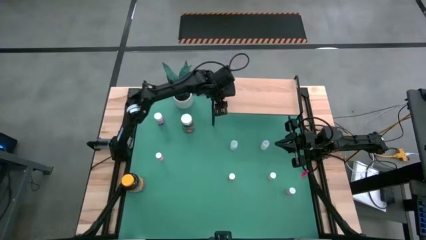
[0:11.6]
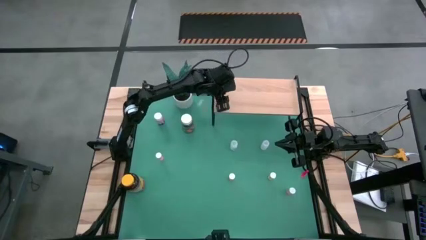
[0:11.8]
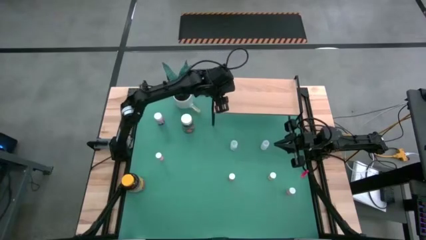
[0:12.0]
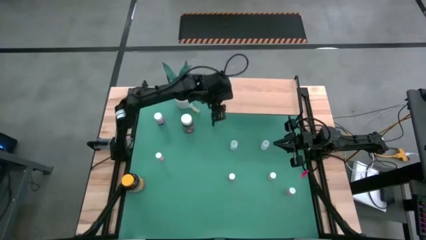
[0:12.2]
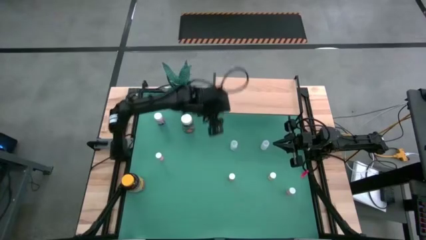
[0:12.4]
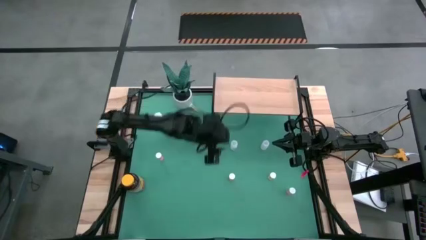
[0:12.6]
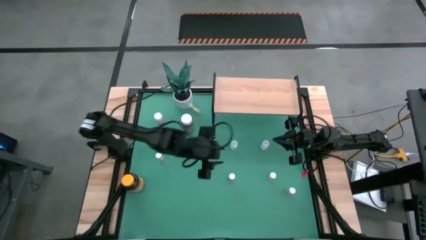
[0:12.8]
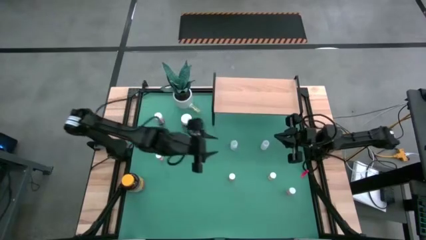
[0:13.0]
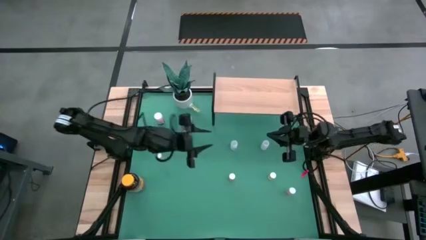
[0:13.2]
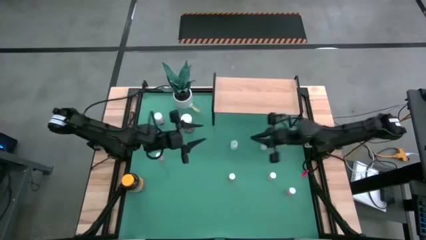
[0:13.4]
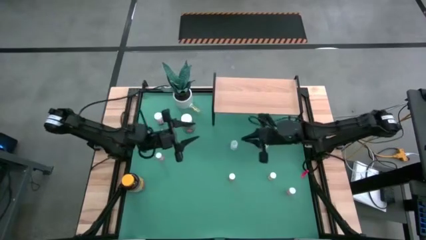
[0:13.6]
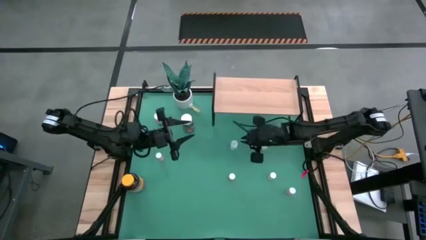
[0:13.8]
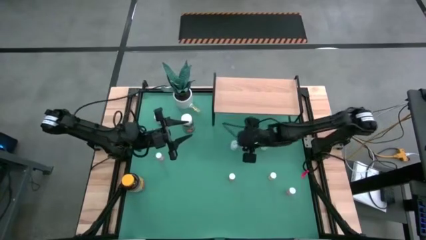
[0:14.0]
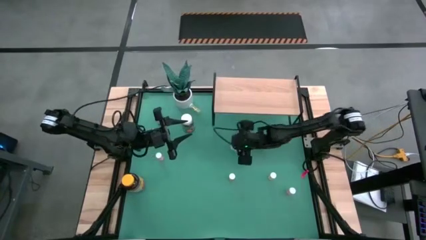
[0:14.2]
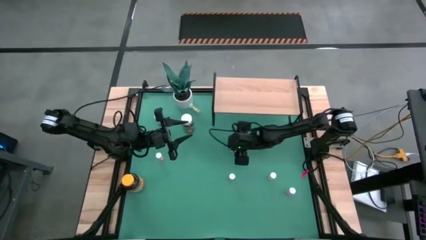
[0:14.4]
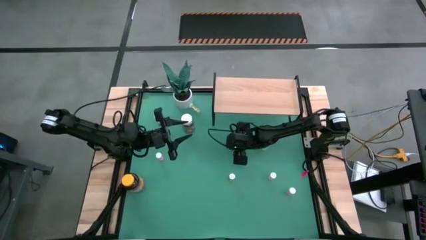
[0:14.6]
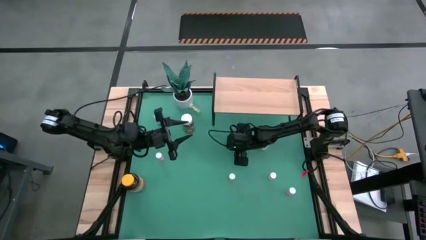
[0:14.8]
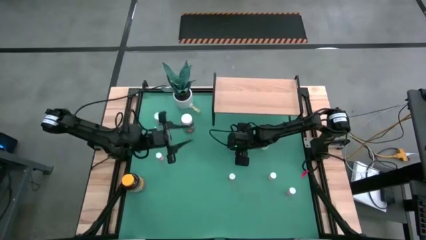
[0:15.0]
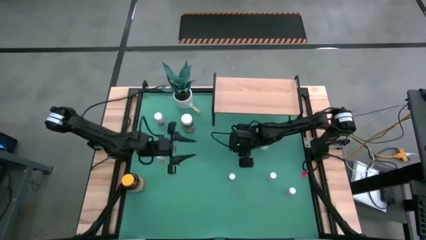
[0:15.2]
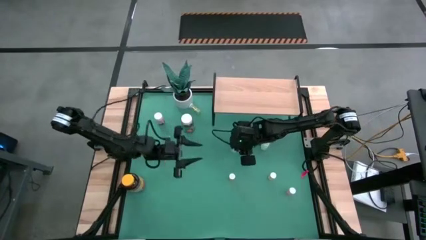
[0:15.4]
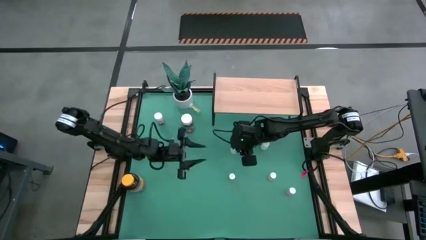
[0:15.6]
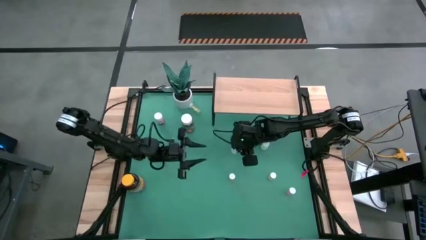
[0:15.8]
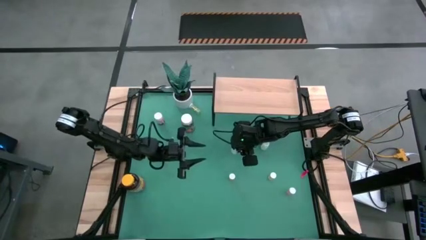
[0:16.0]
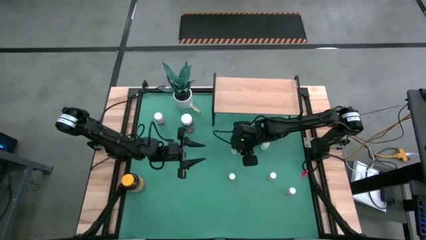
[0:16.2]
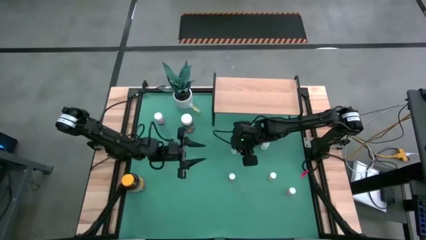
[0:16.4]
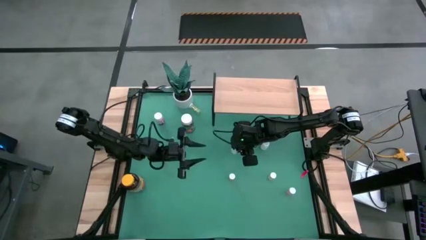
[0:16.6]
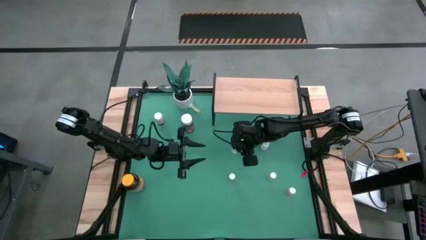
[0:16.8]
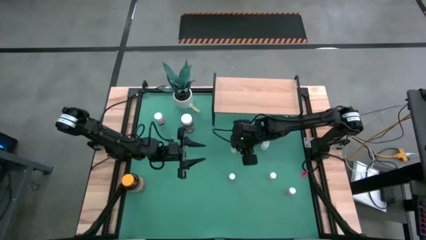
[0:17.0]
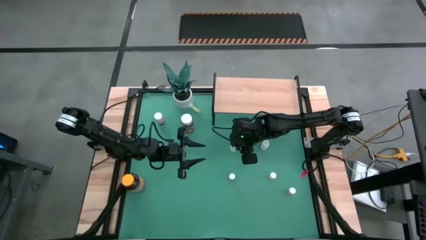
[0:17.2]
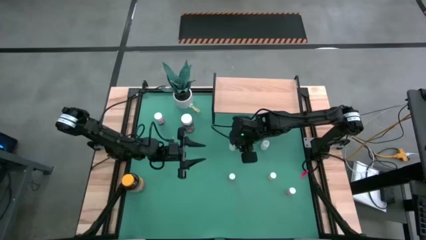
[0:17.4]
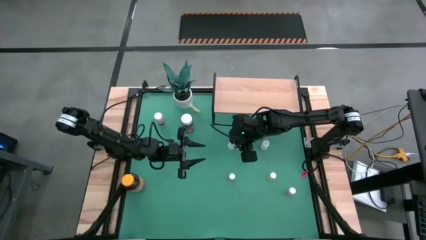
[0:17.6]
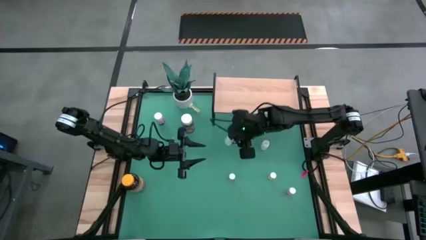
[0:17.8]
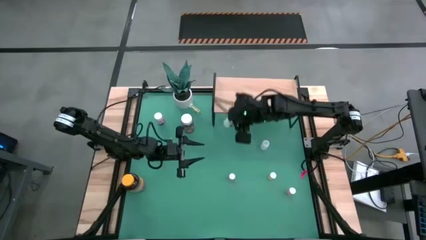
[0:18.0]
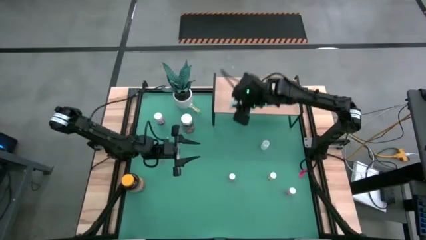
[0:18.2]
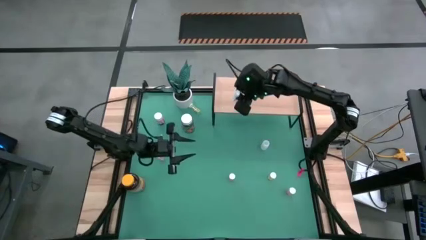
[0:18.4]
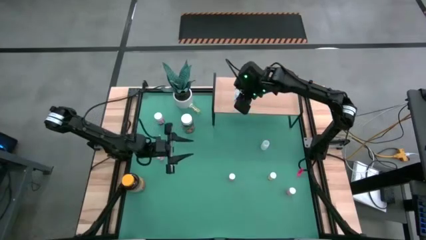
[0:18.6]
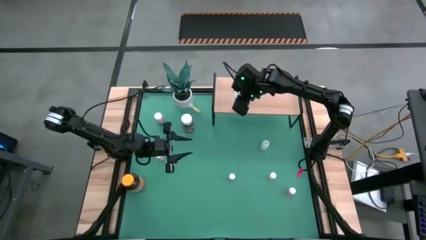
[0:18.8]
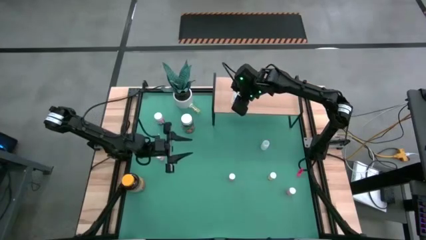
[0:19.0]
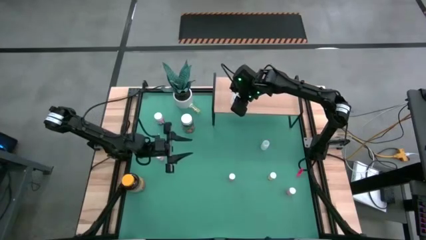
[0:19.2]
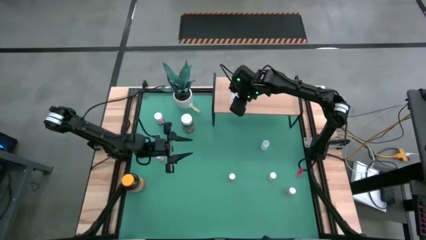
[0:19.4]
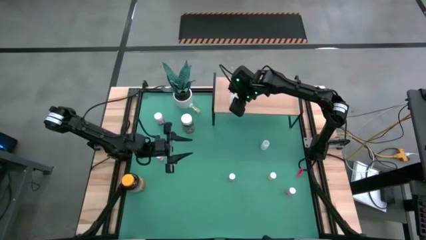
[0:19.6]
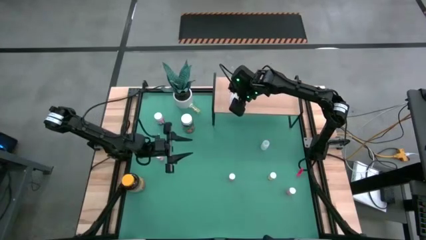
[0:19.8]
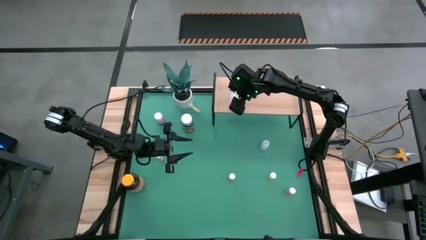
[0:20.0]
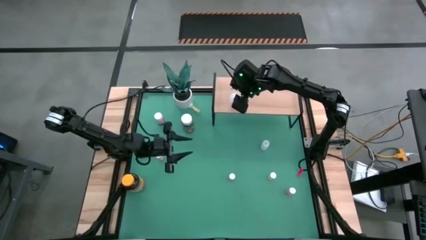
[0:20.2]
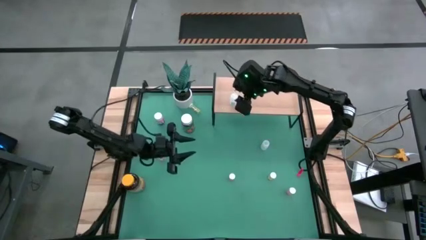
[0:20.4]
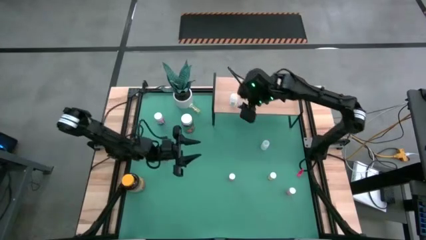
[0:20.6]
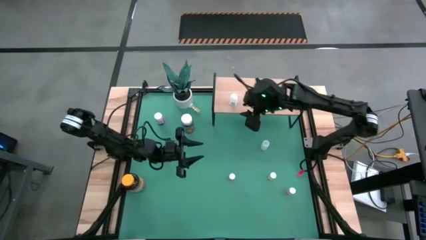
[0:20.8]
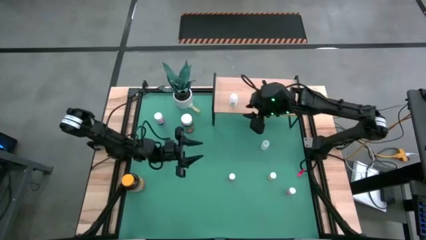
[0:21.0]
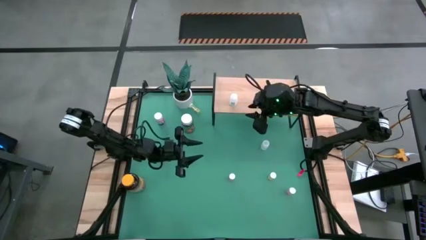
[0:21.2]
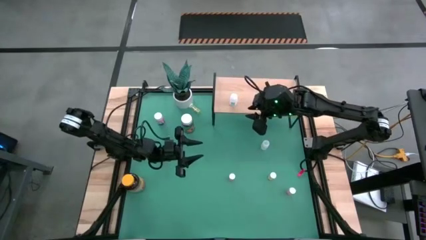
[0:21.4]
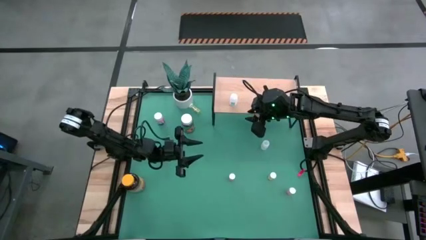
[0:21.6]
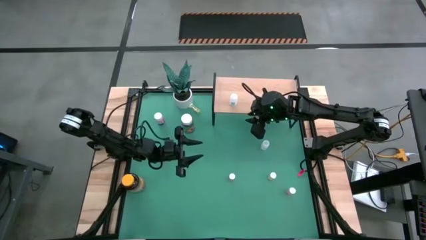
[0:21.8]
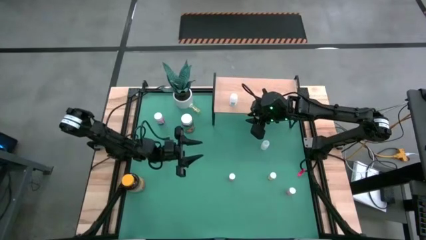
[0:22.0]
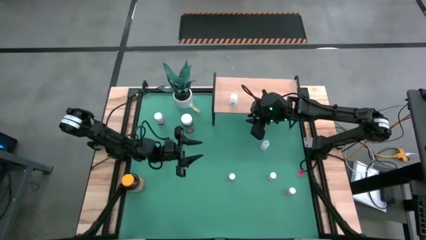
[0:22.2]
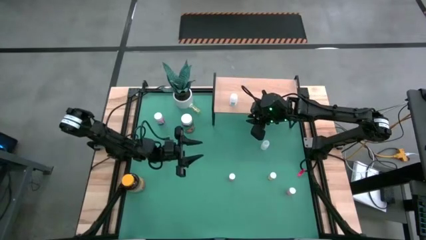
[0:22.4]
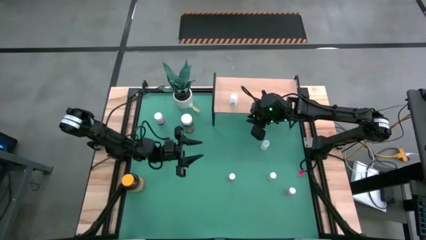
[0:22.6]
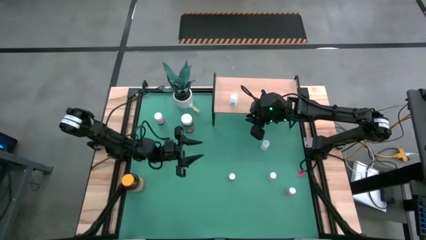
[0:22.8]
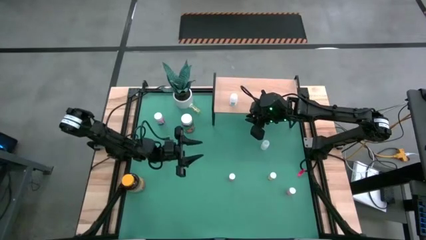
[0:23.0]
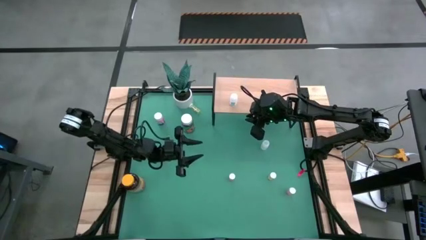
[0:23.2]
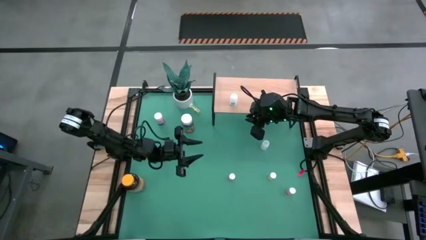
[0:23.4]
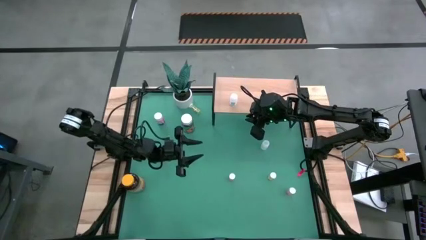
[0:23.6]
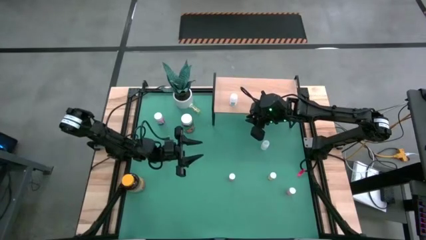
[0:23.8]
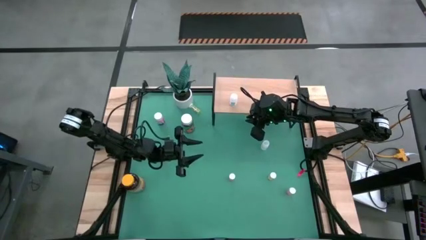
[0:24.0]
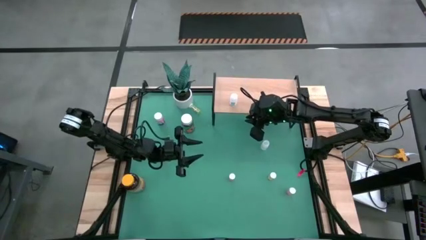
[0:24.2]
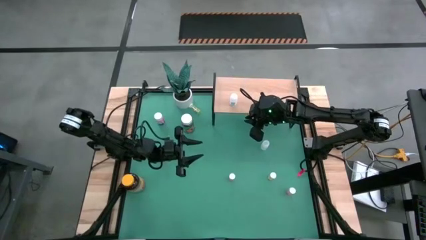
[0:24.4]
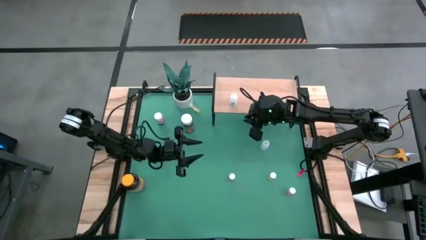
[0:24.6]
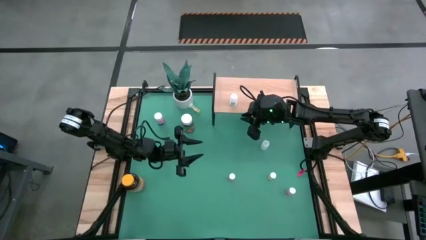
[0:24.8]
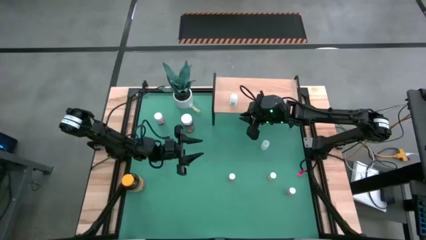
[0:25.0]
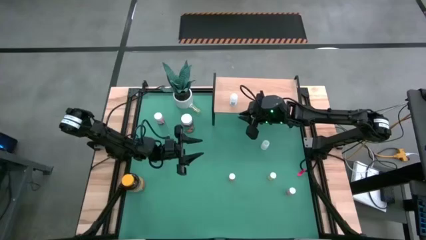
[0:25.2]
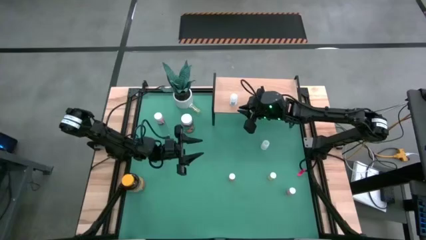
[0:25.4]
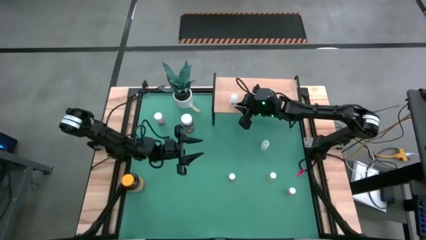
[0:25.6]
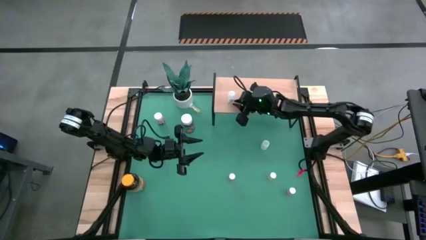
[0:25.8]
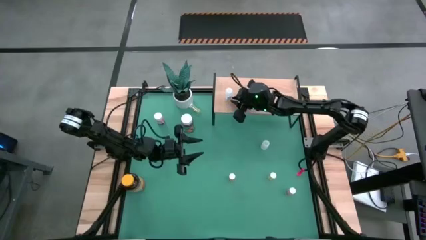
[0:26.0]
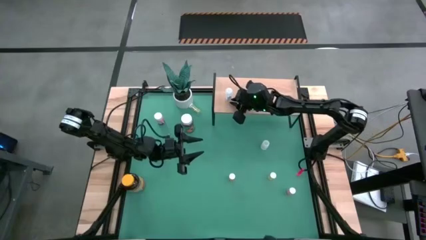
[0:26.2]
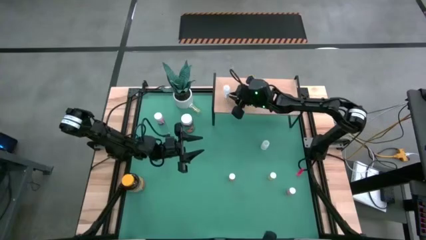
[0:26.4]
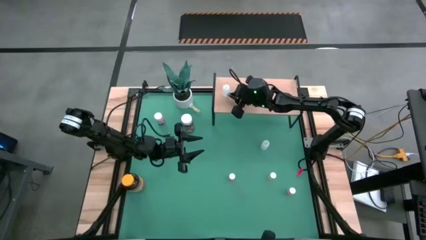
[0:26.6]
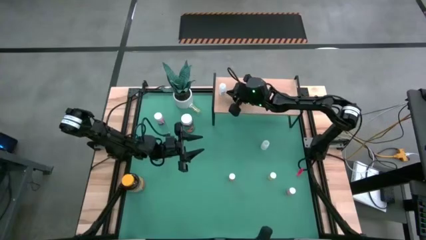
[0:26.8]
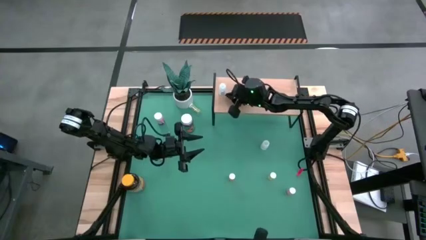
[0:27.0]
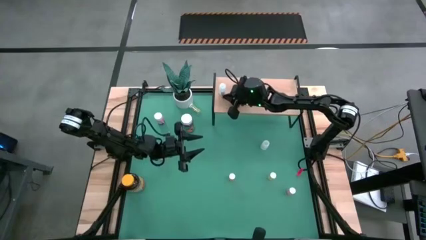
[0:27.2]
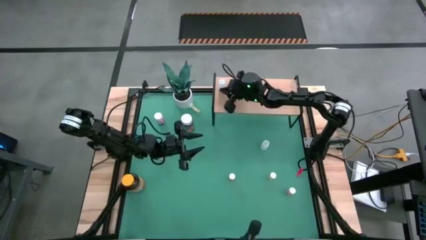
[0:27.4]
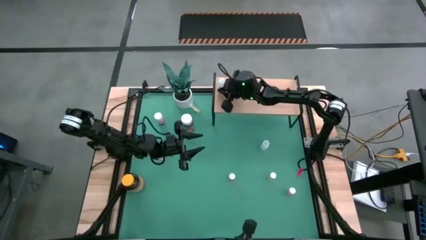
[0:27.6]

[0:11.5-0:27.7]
Task: Pick and place medicine bottles onto shelf by color
Put the left white pill bottle on the shelf
